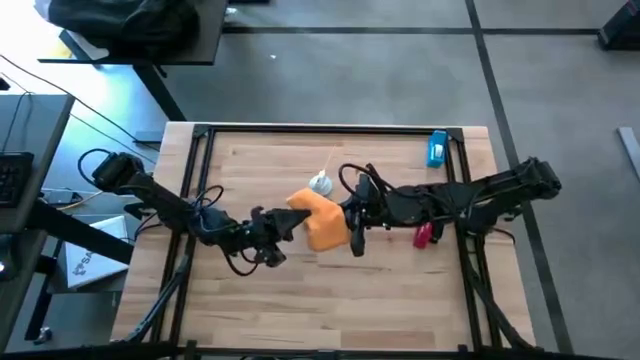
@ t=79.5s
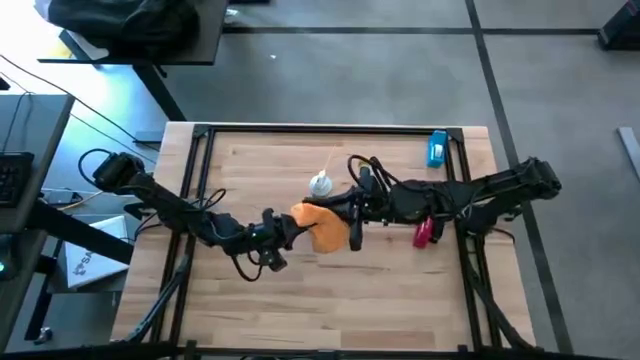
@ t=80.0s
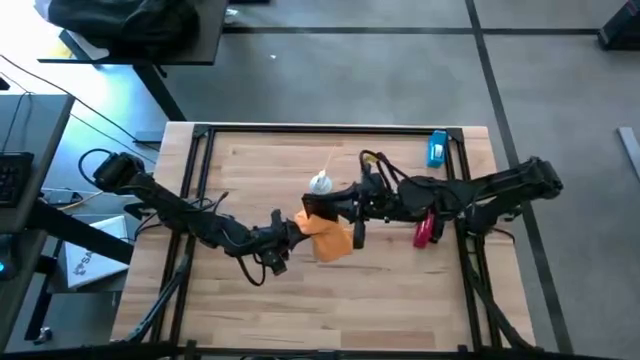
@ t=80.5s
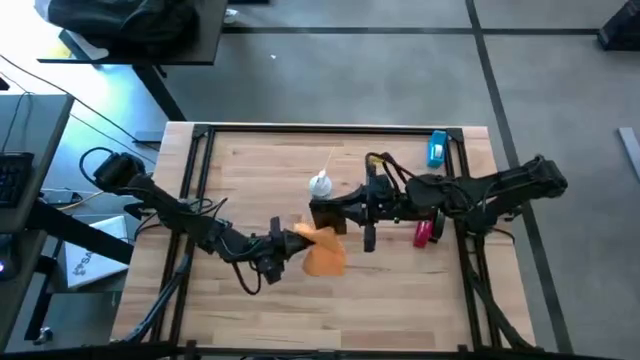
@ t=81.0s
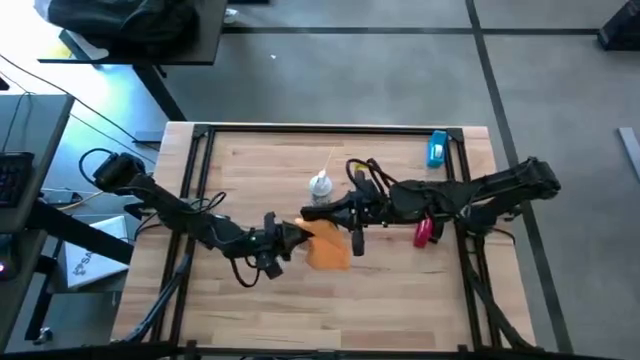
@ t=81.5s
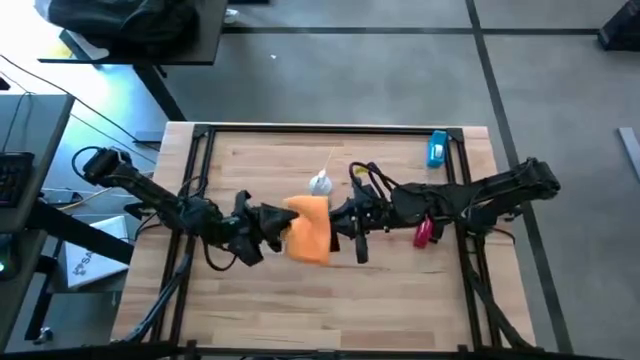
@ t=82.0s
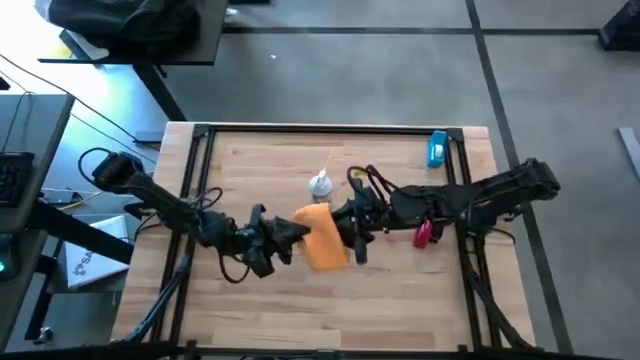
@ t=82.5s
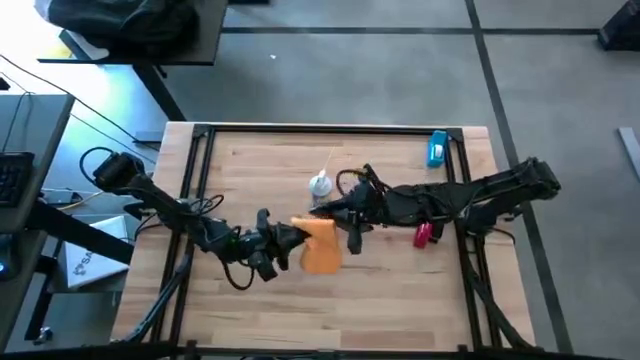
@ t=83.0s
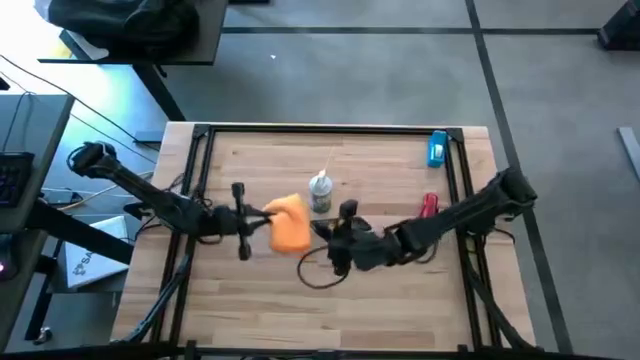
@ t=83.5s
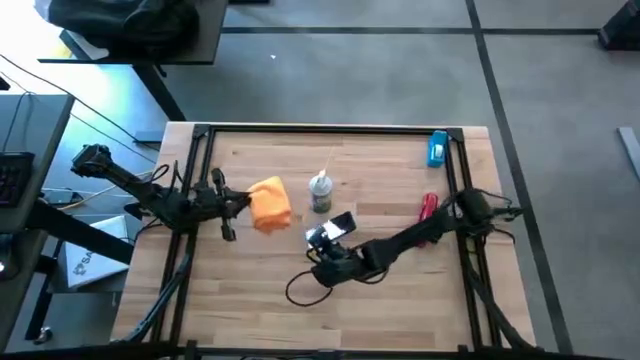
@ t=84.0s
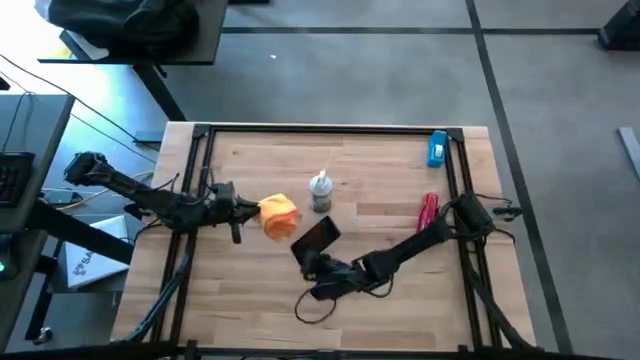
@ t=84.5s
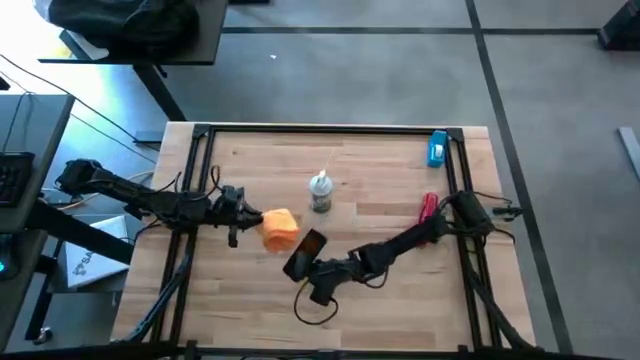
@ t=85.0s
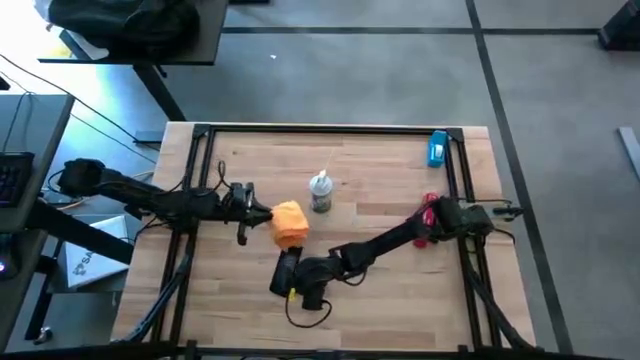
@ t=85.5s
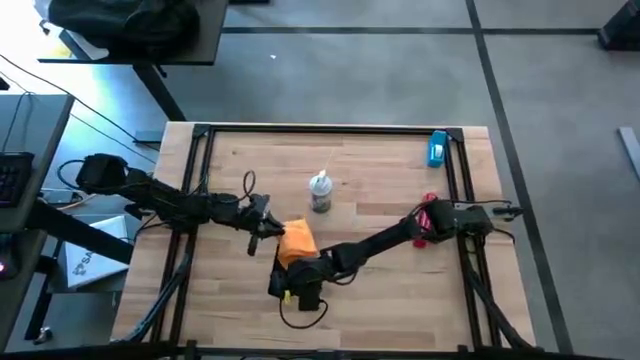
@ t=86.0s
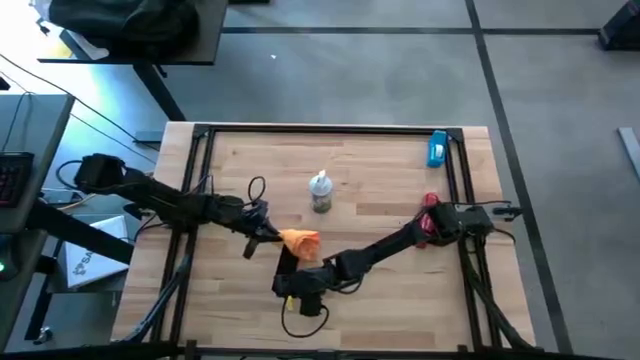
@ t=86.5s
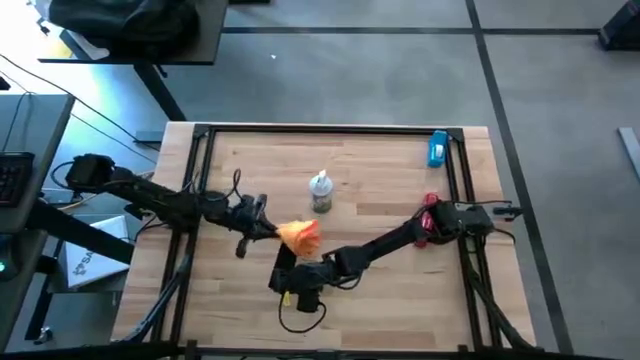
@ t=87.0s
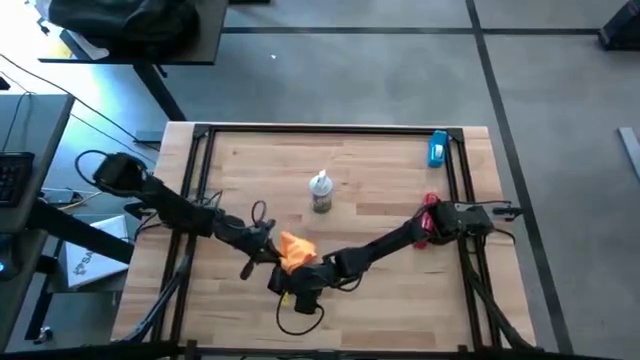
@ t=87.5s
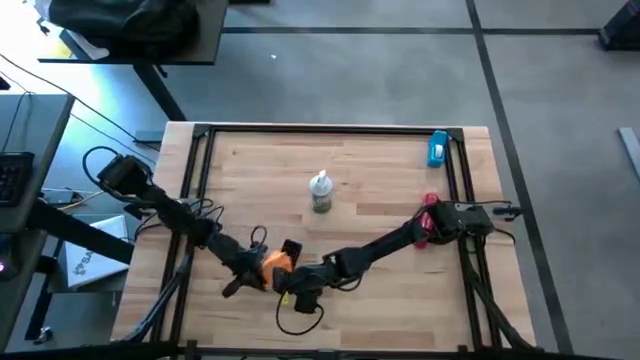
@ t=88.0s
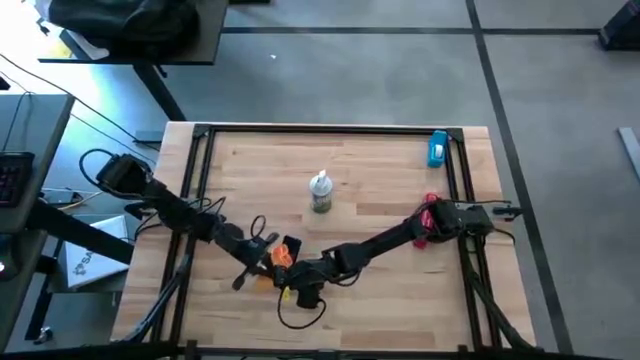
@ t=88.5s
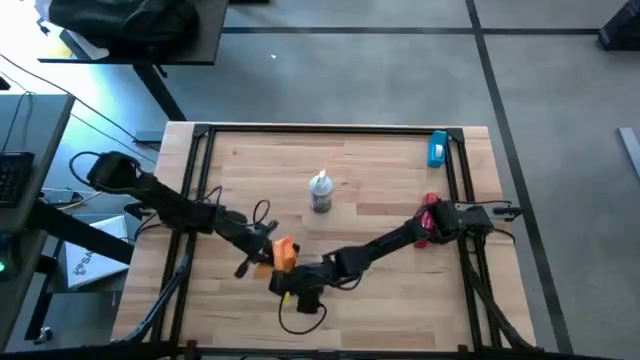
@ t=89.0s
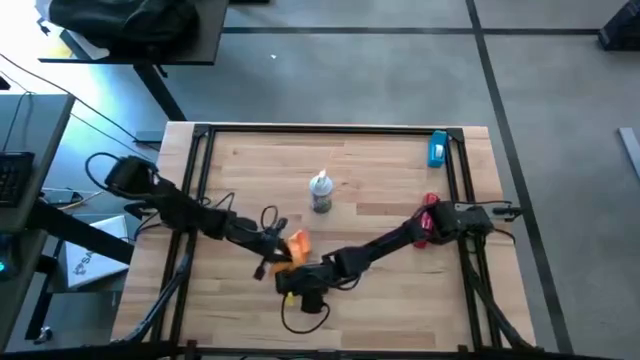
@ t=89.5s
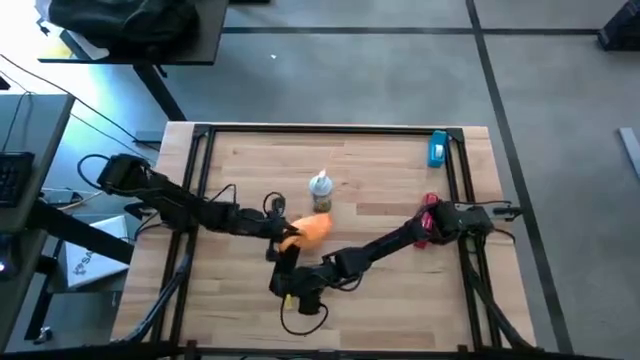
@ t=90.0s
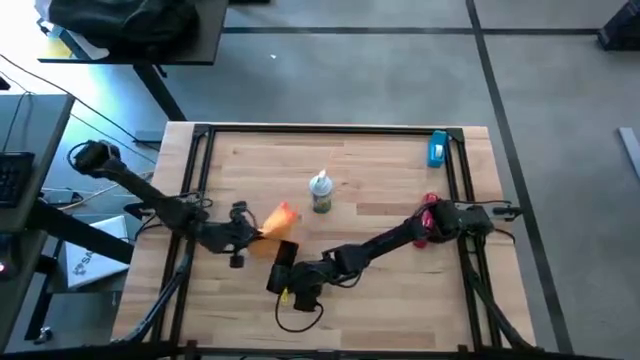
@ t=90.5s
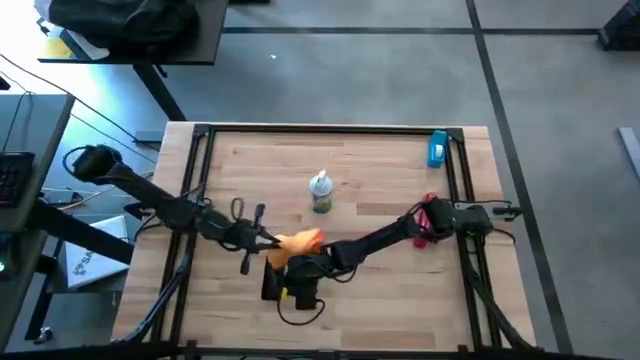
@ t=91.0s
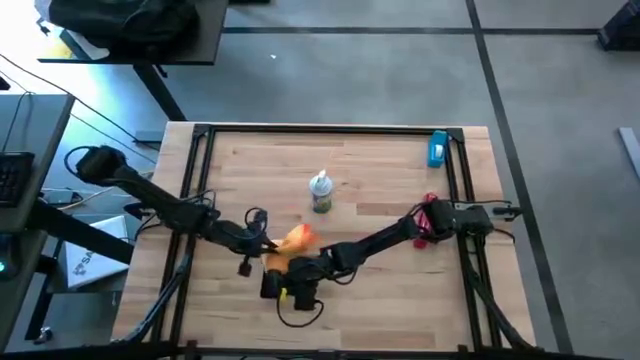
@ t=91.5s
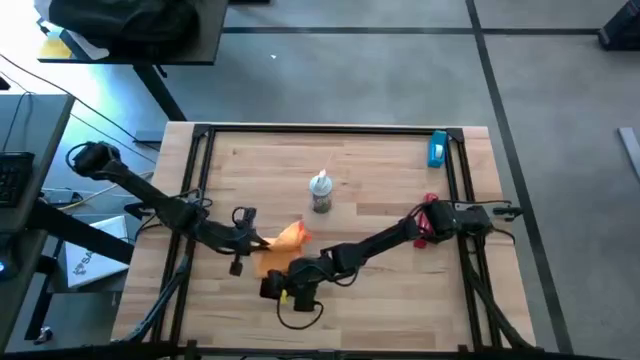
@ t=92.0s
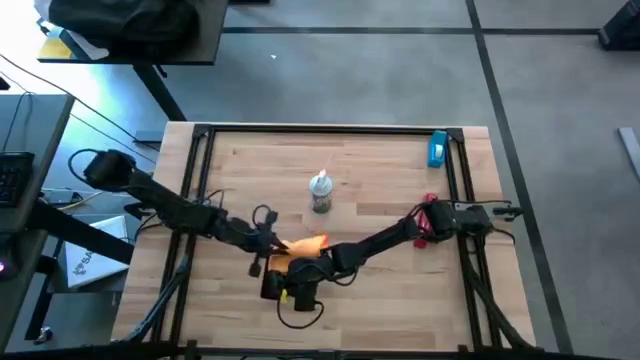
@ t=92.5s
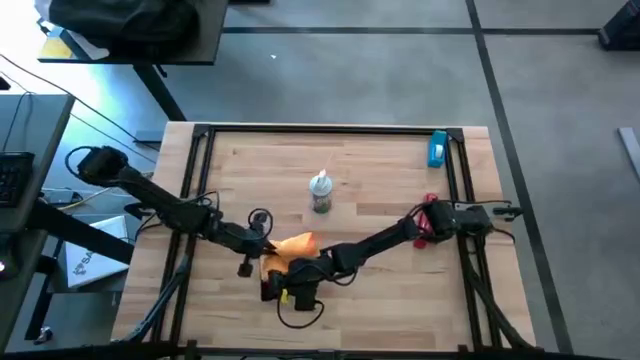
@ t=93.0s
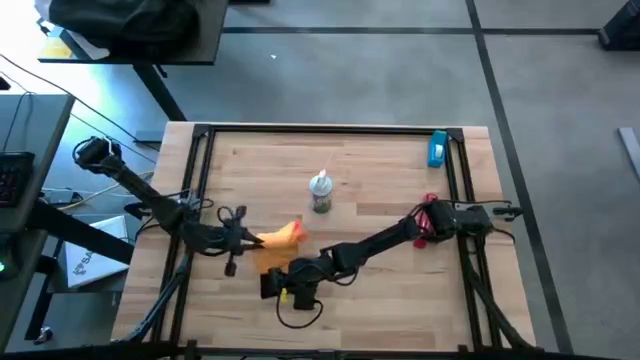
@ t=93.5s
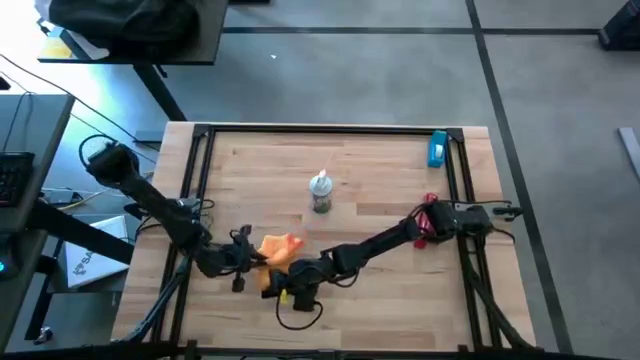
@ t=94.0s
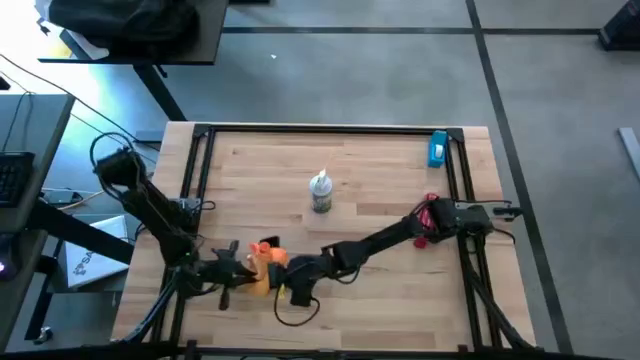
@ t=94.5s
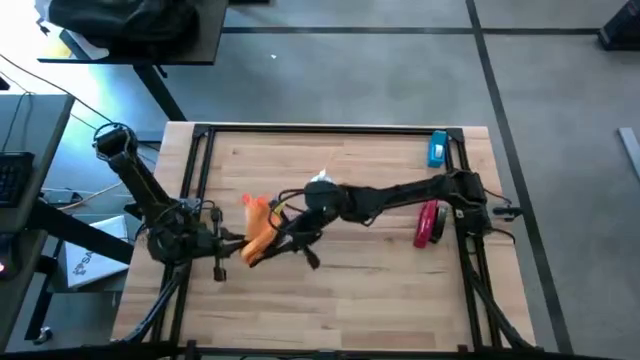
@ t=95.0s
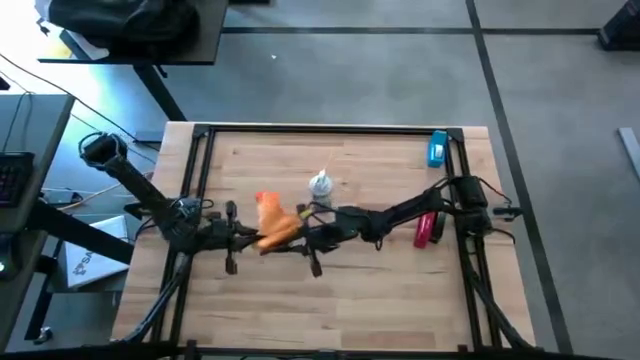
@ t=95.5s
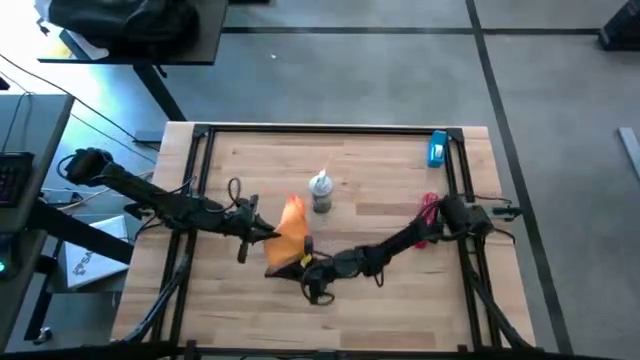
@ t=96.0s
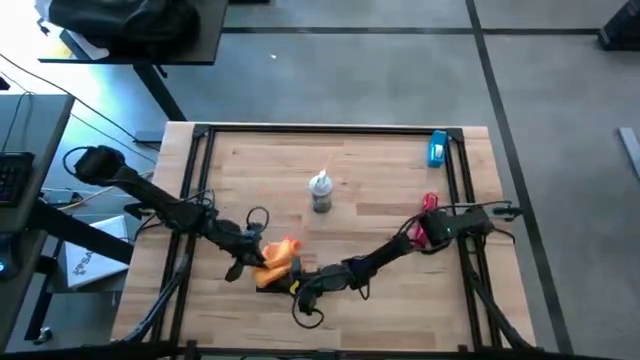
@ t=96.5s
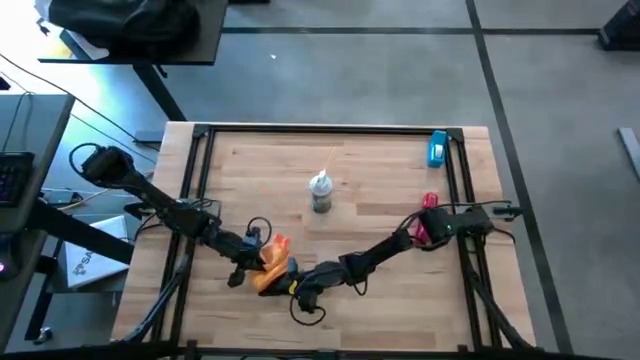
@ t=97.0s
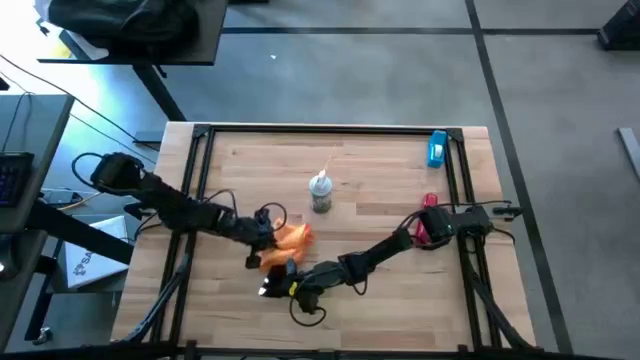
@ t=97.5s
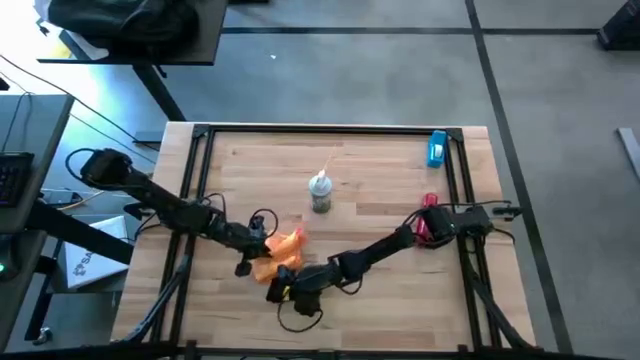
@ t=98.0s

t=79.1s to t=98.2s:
Task: Apply microfiber cloth
Wipe the black cellphone using the green microfiber cloth
